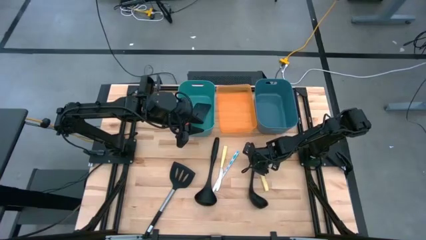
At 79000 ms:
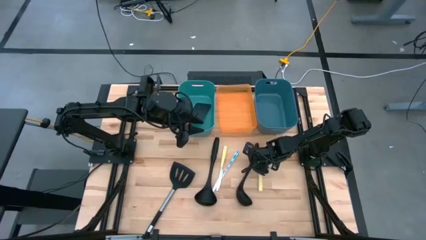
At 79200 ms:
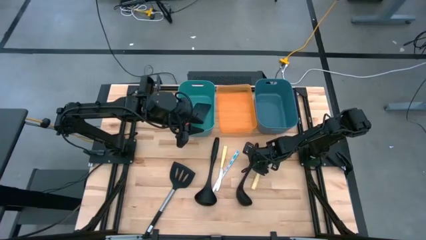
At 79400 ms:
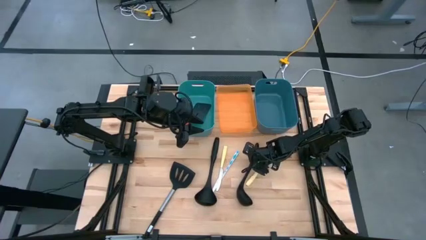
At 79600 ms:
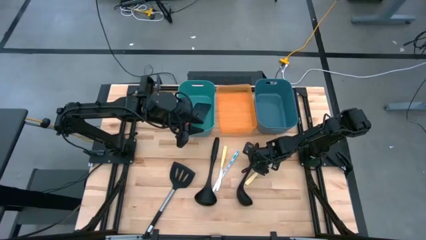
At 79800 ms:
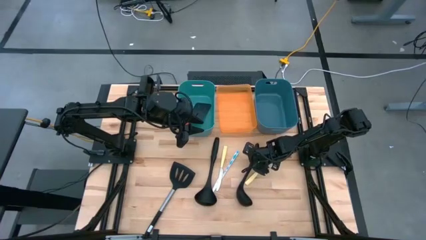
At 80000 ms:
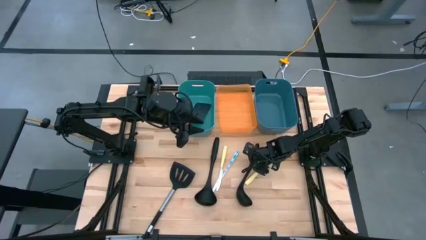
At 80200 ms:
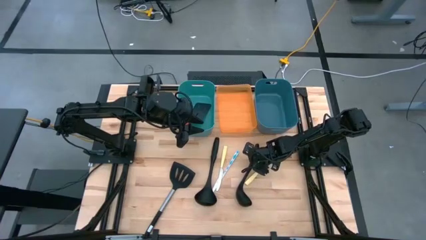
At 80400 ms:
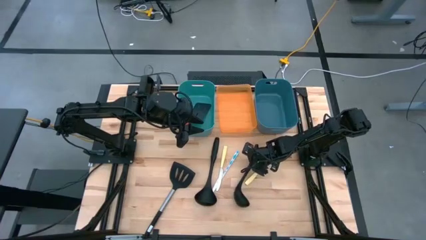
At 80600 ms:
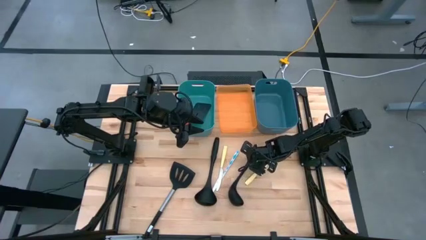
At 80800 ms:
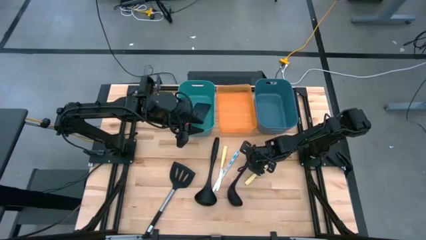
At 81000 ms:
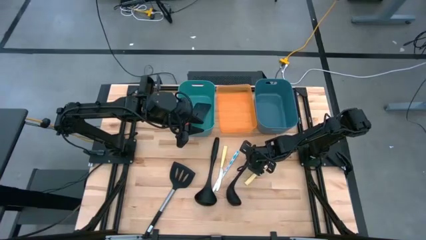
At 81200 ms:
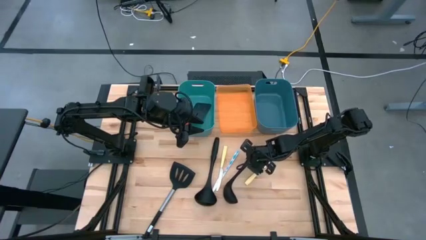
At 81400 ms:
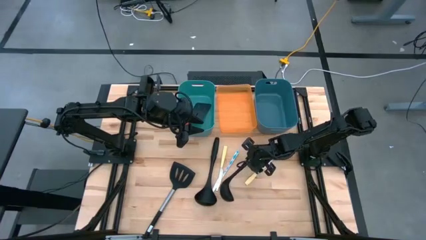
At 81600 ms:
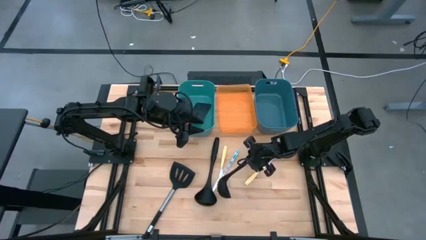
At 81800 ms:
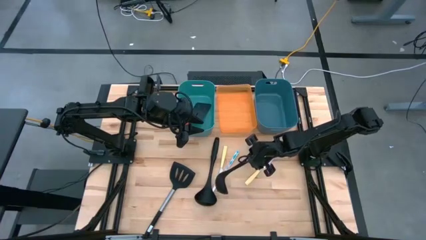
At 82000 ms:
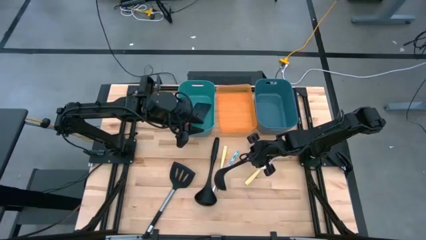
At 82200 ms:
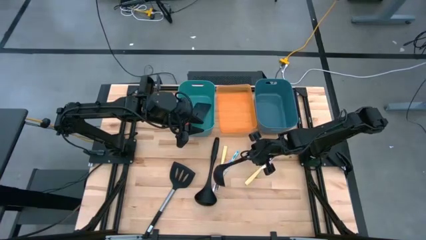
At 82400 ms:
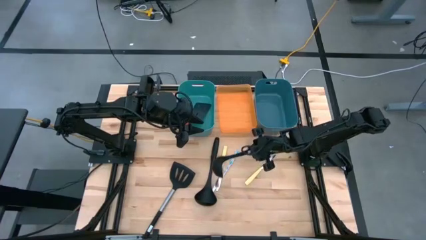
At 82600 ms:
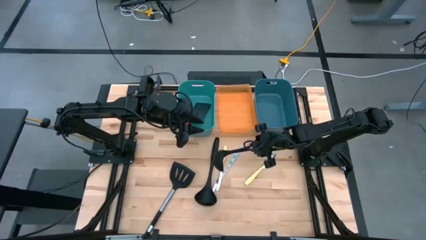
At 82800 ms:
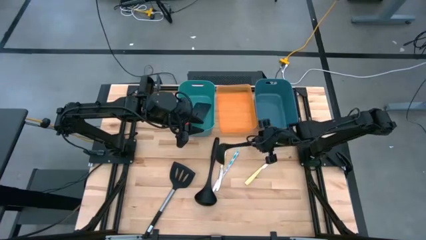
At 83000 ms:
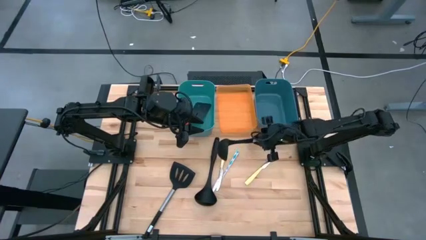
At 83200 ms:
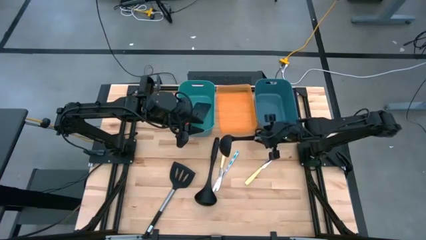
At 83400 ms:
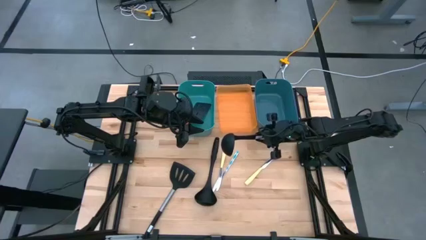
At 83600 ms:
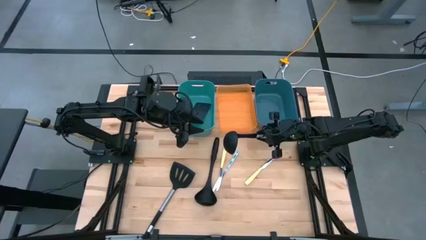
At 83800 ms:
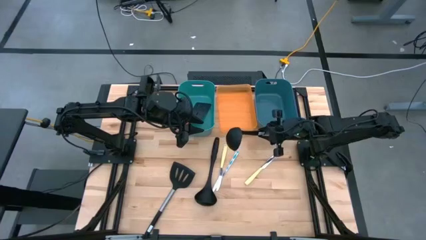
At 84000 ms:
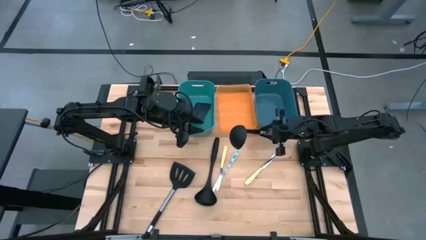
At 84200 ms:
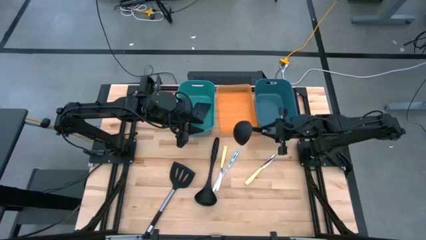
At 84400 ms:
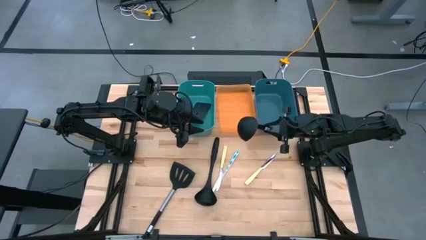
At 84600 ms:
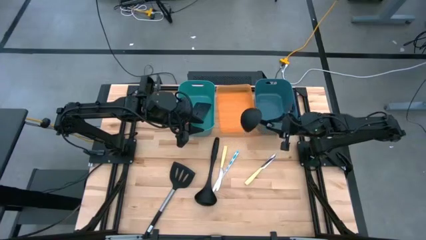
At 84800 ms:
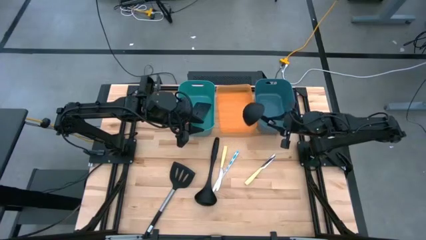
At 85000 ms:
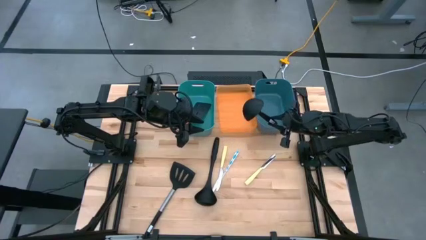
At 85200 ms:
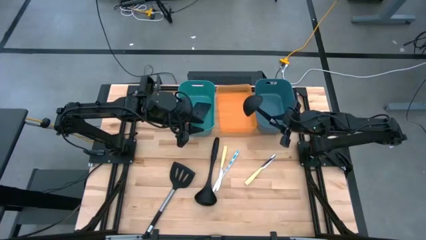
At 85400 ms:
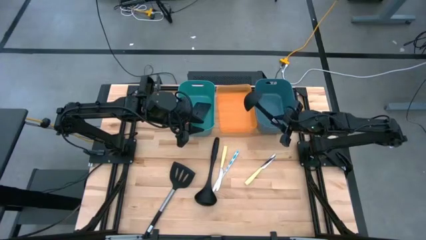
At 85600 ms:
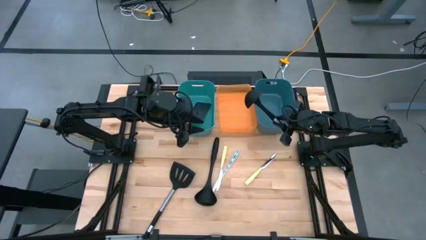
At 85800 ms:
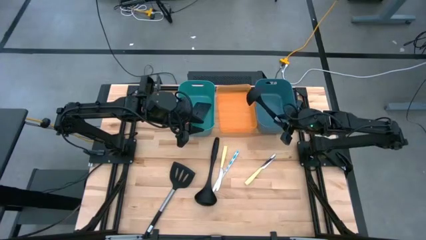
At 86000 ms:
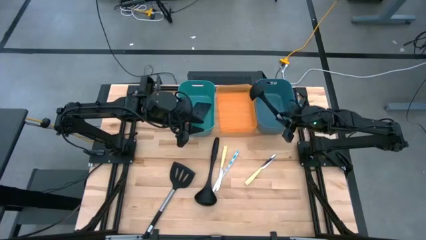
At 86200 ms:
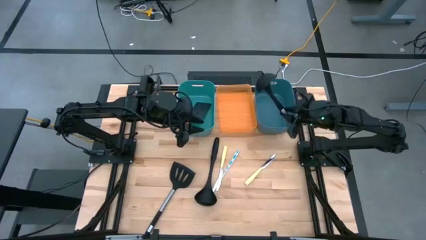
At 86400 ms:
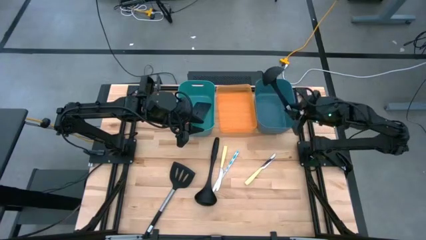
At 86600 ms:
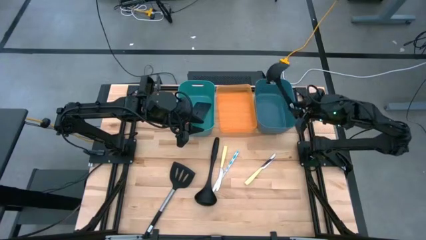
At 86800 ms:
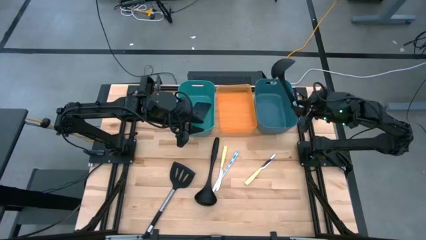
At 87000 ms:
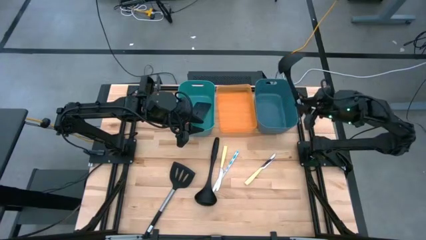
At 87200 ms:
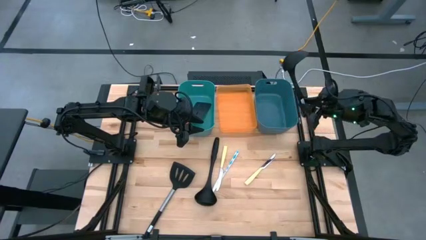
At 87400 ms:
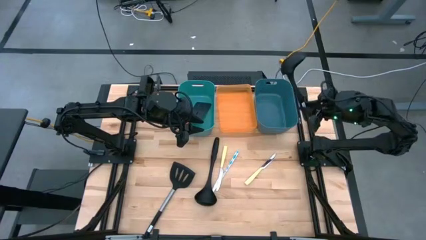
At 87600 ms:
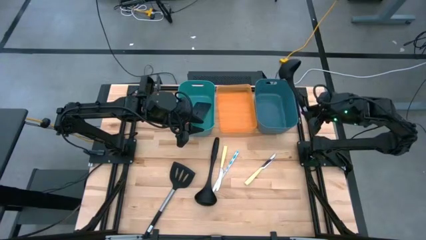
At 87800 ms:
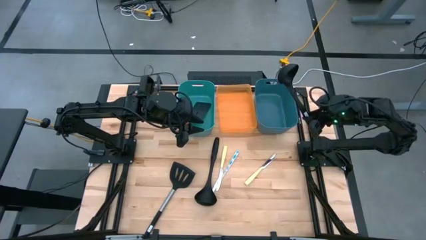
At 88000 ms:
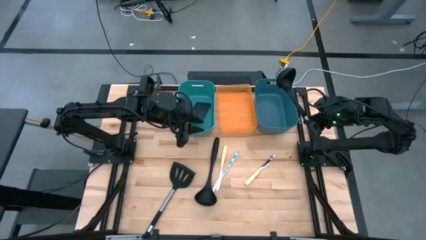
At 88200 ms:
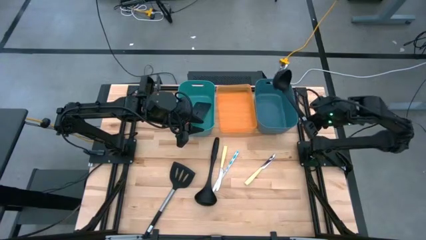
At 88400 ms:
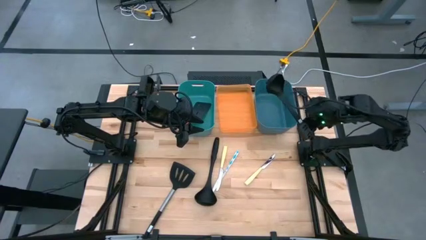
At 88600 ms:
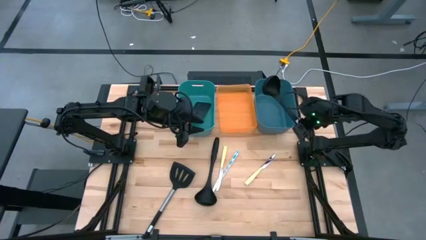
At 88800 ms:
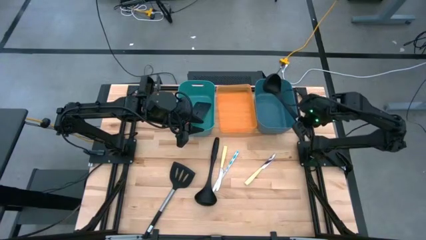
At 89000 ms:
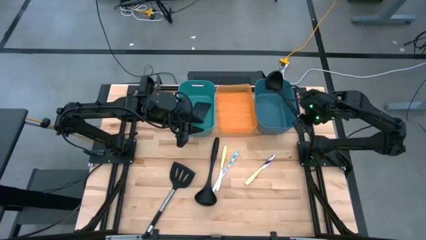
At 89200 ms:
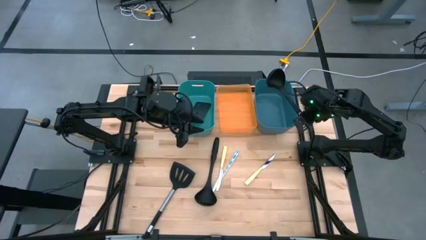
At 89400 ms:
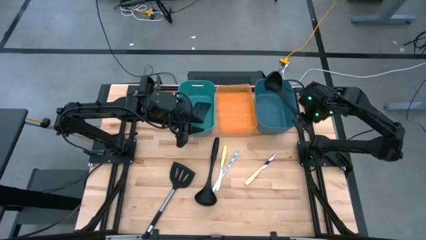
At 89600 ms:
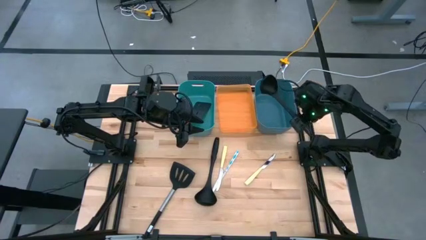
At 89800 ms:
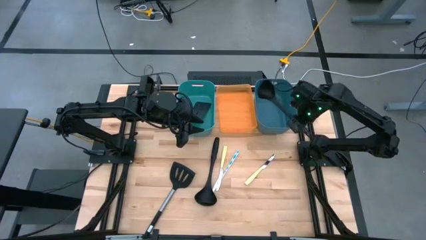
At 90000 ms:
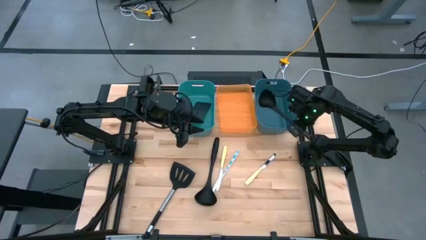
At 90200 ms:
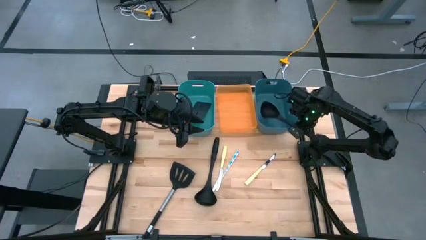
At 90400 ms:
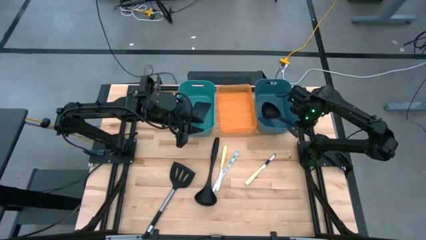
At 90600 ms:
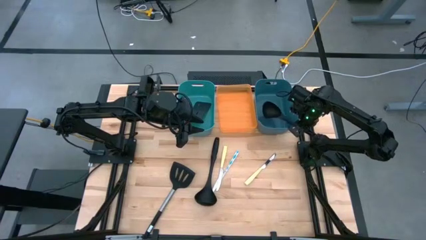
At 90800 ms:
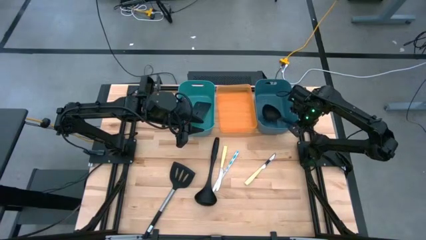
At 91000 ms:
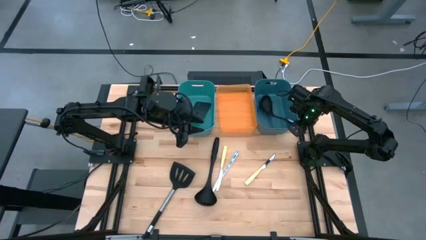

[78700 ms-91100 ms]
Task: Pick & Place Kitchen Items
Put the right black ladle into the blue bin
